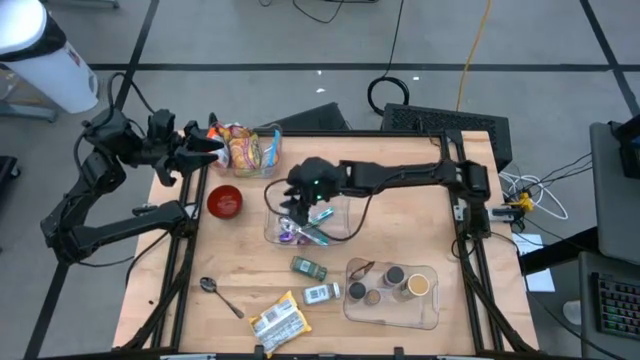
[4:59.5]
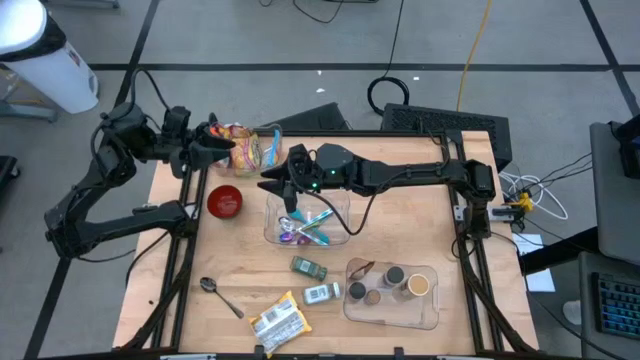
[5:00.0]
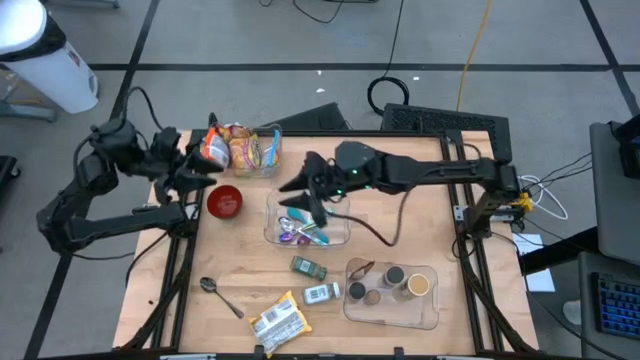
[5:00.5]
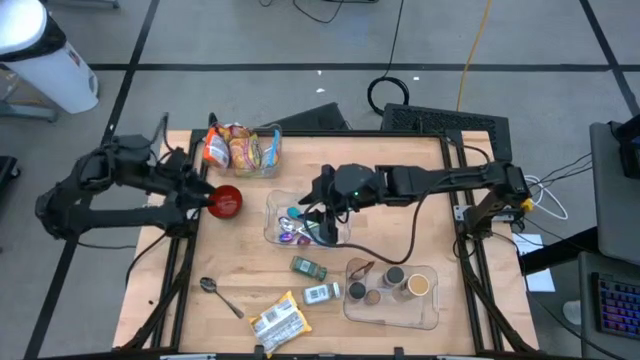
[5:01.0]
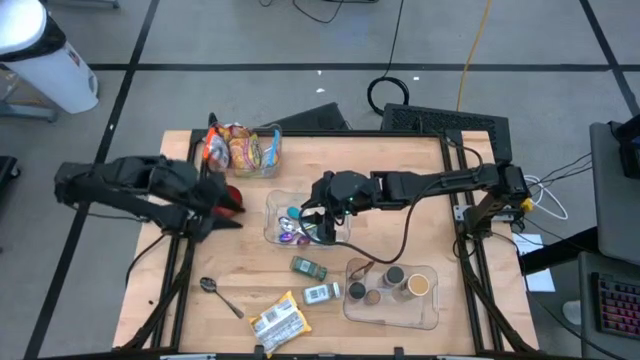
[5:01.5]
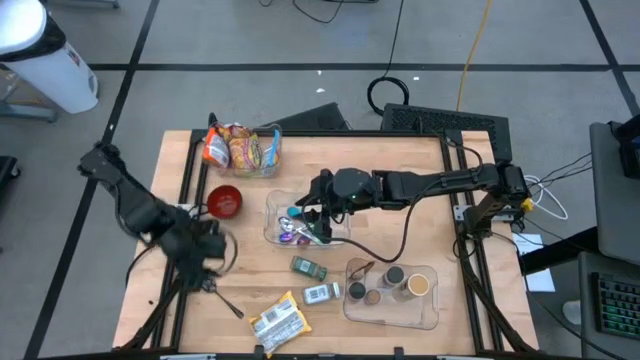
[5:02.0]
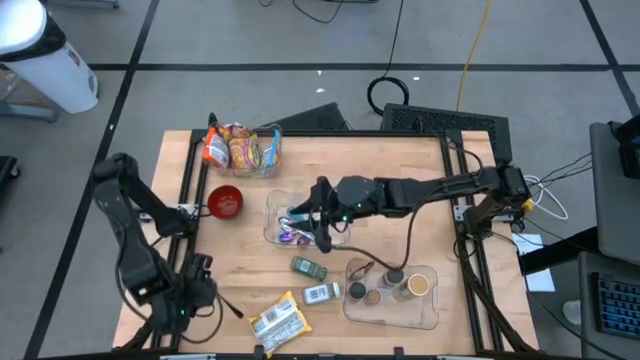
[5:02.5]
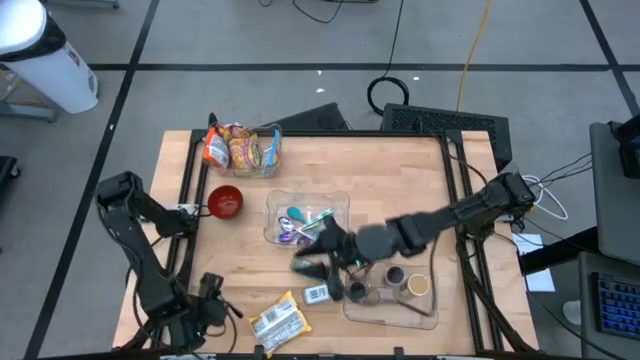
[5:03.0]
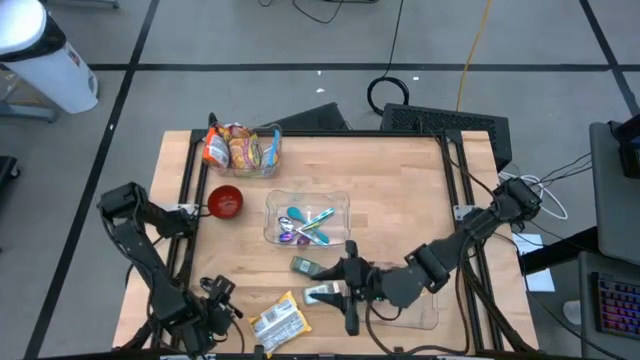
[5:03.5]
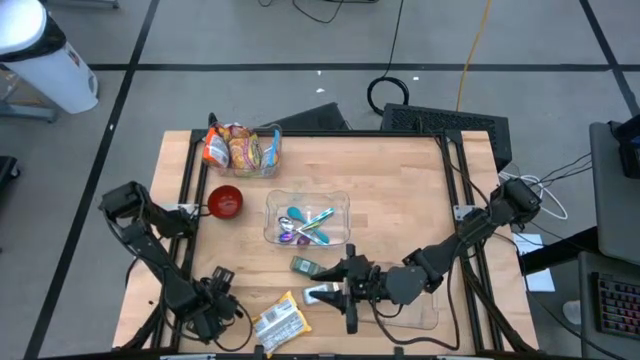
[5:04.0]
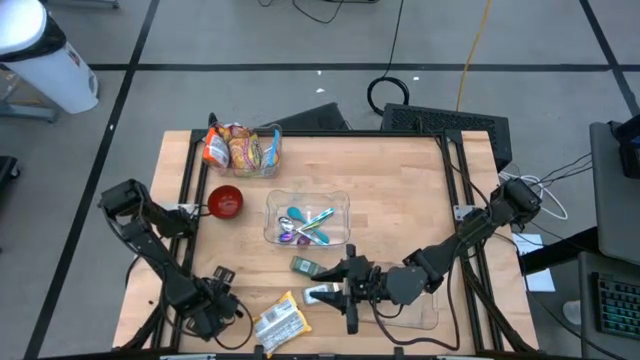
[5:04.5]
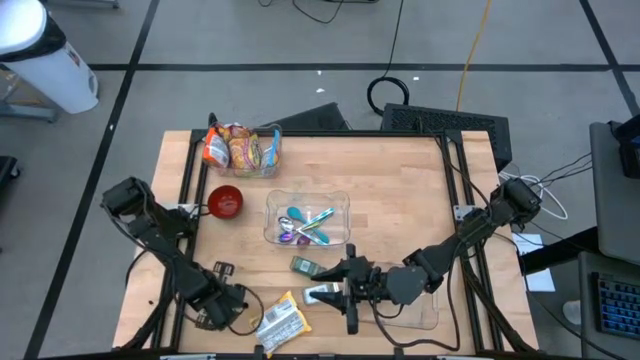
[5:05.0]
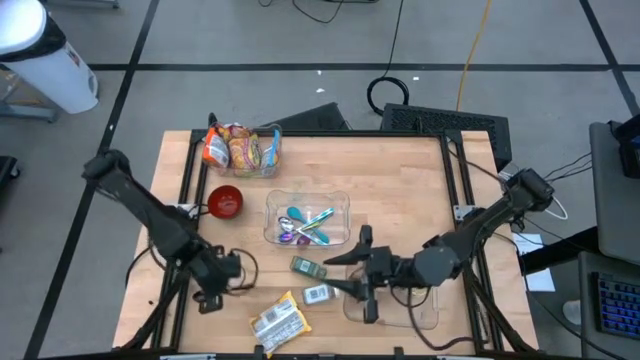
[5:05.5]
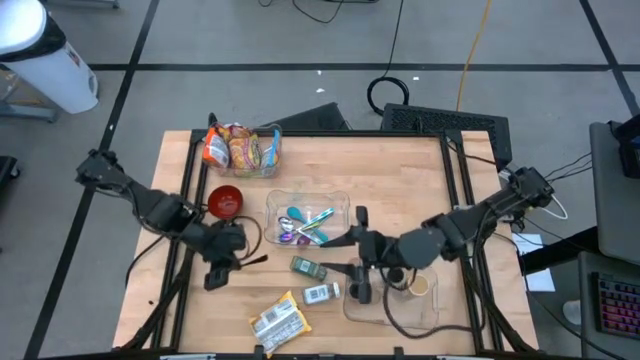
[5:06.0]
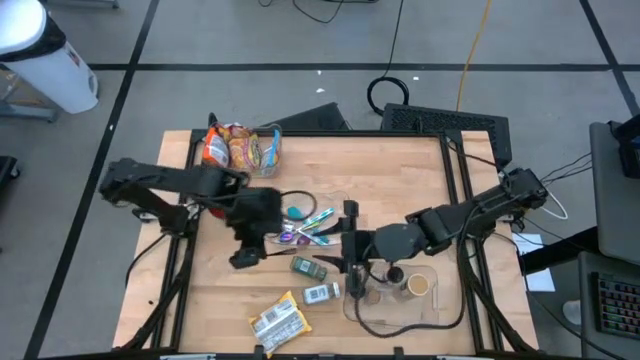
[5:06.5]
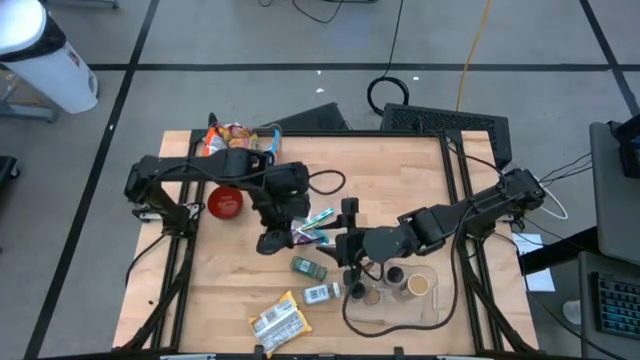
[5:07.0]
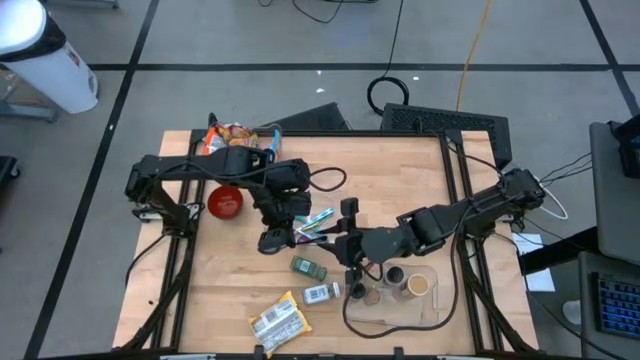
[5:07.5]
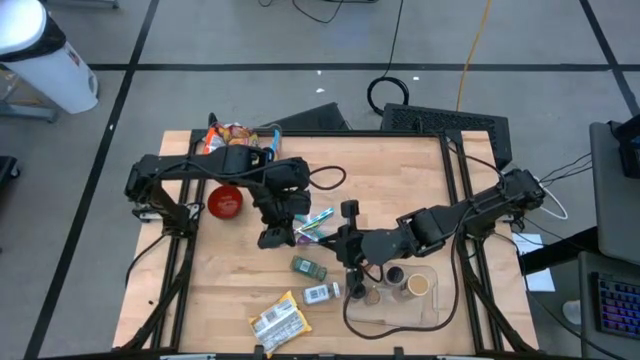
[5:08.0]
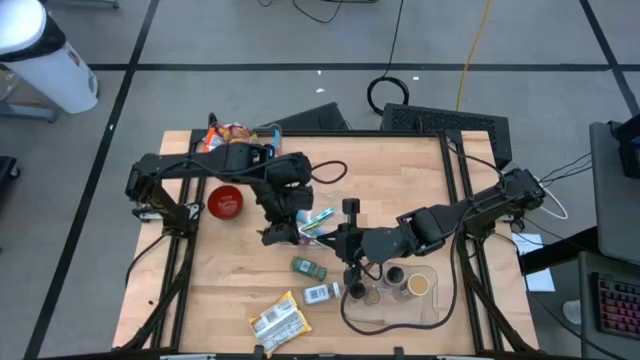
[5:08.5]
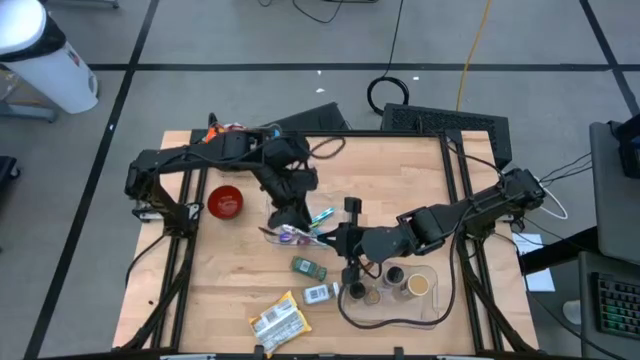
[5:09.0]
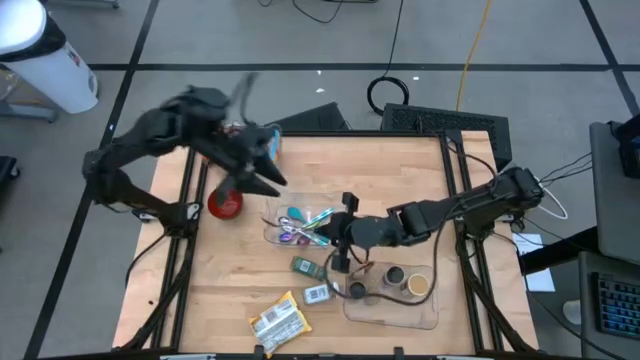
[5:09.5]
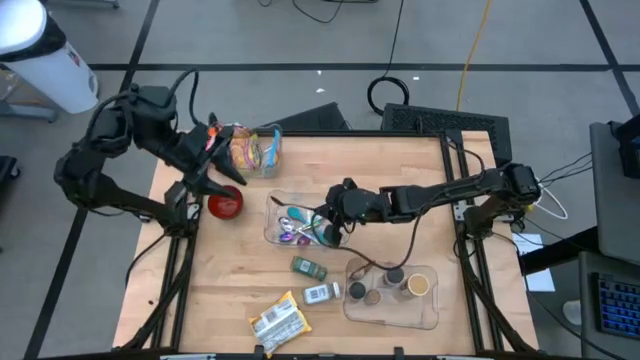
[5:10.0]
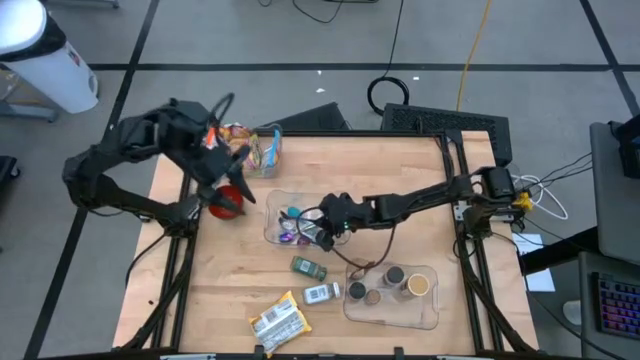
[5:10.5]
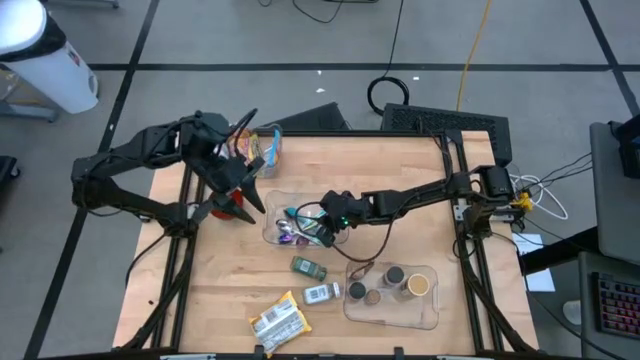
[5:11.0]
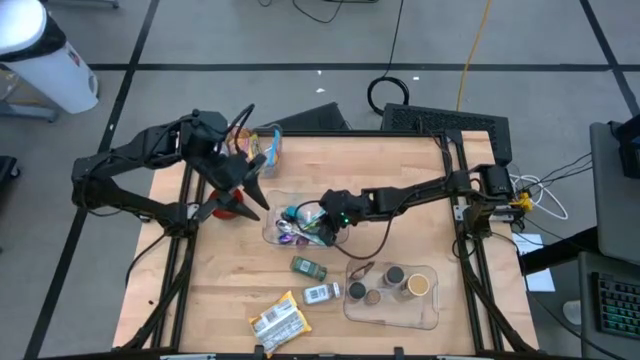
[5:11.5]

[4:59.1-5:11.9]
Task: Pick & Place Food Item
Put the black spoon into the middle transparent bin

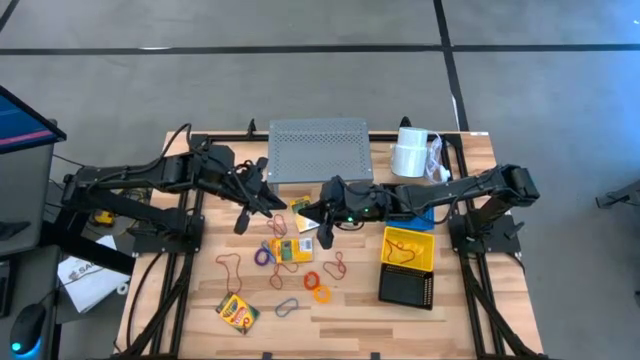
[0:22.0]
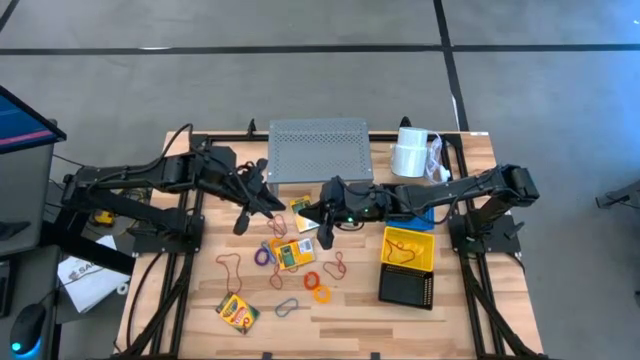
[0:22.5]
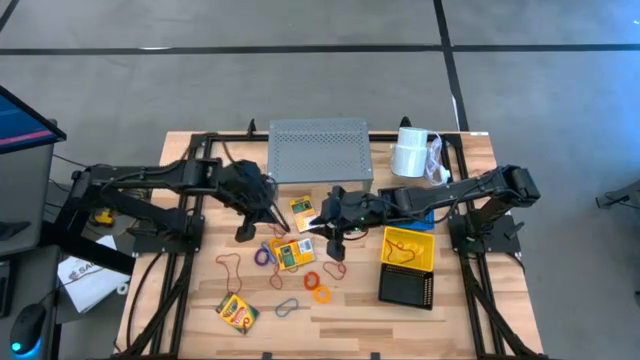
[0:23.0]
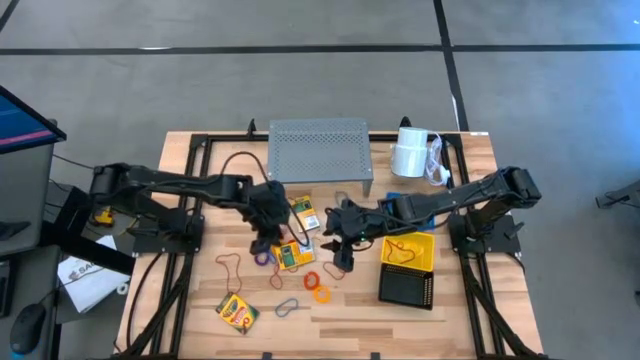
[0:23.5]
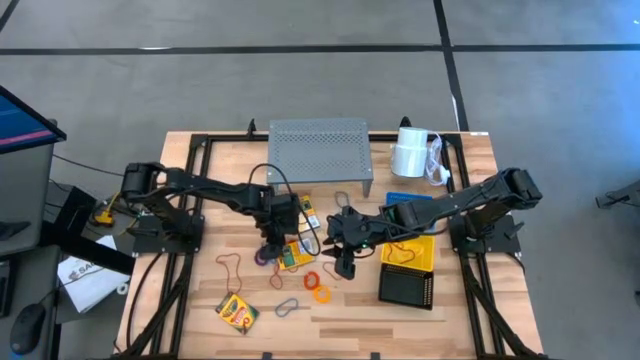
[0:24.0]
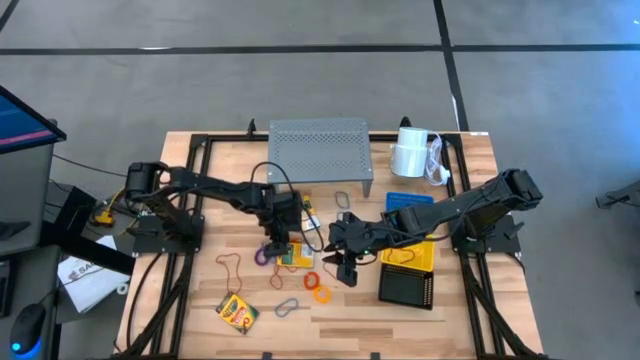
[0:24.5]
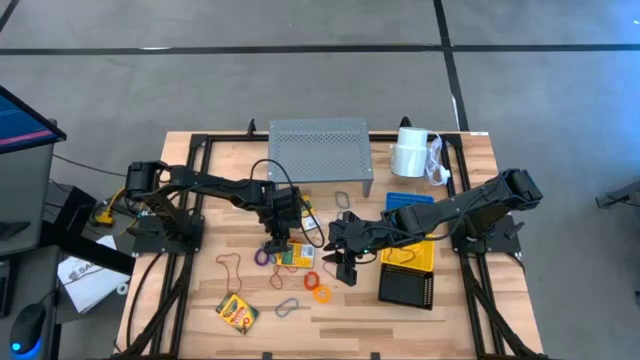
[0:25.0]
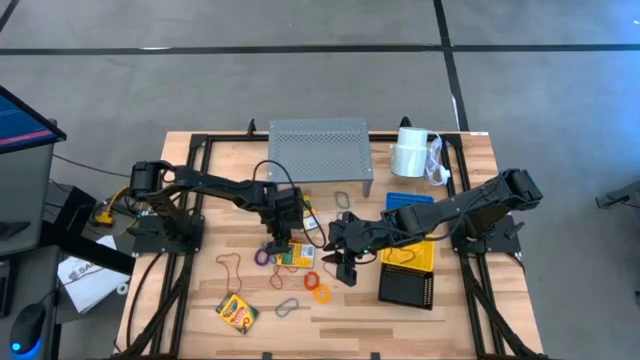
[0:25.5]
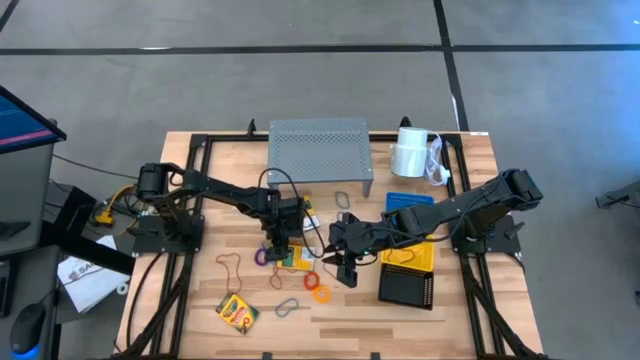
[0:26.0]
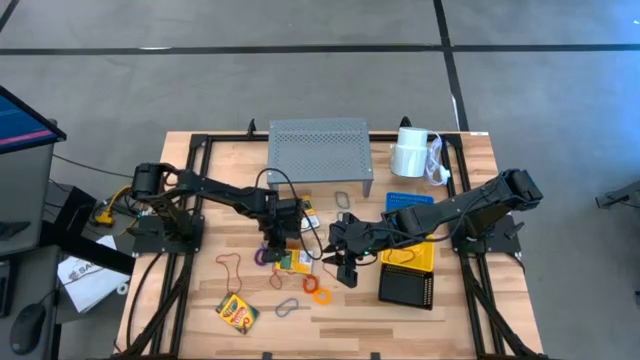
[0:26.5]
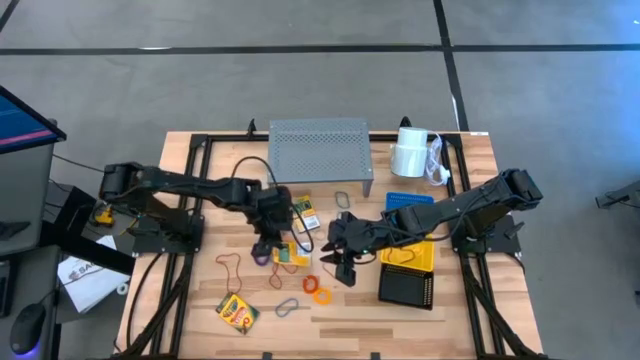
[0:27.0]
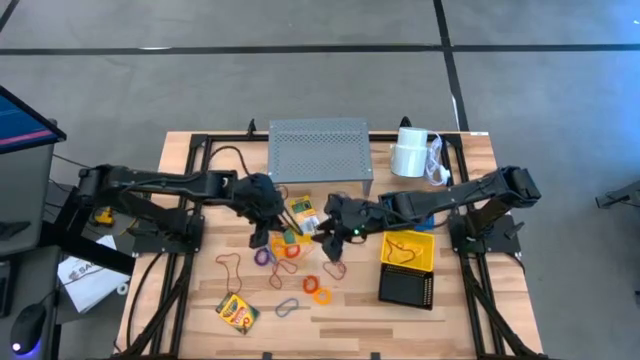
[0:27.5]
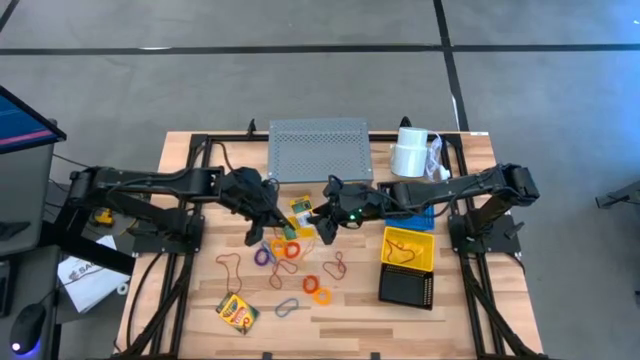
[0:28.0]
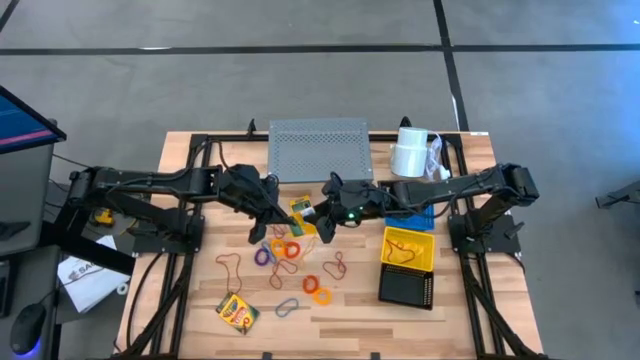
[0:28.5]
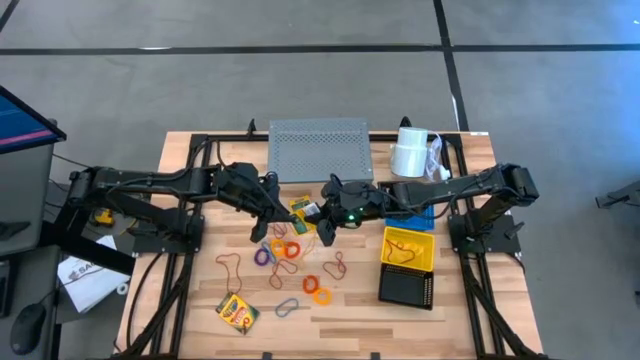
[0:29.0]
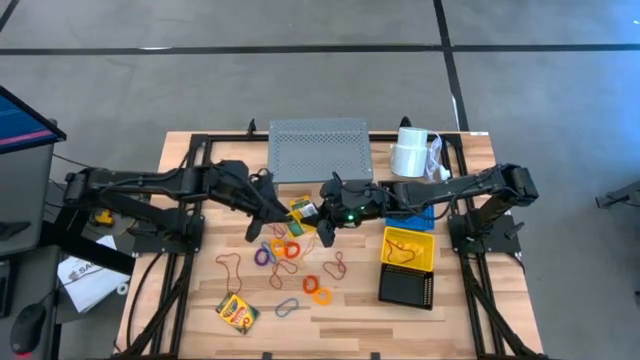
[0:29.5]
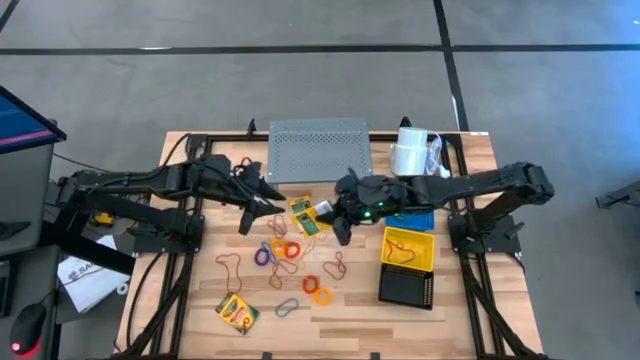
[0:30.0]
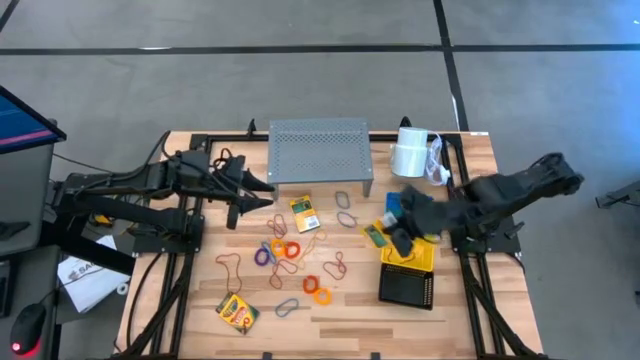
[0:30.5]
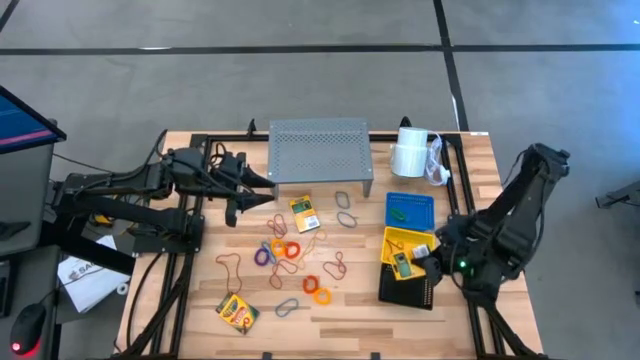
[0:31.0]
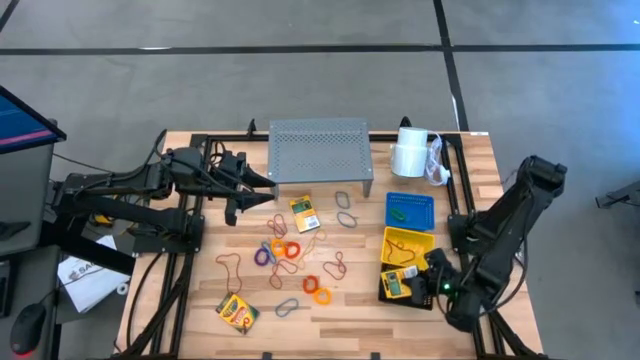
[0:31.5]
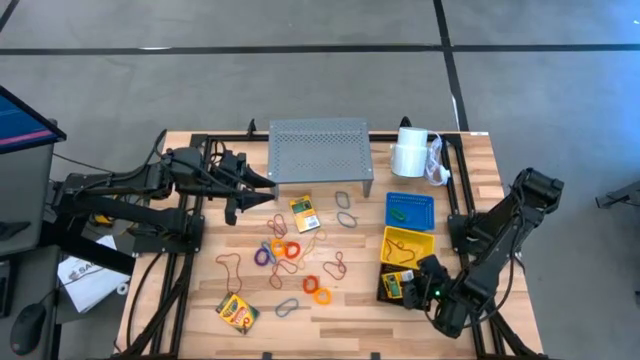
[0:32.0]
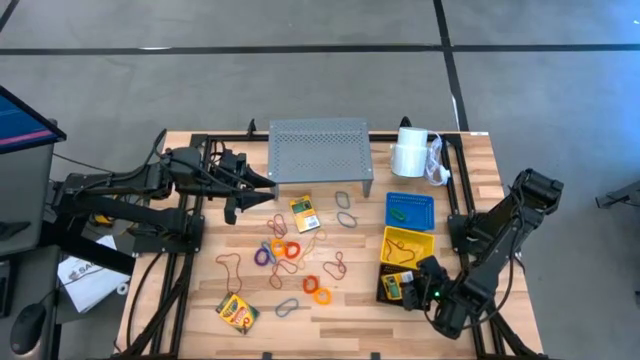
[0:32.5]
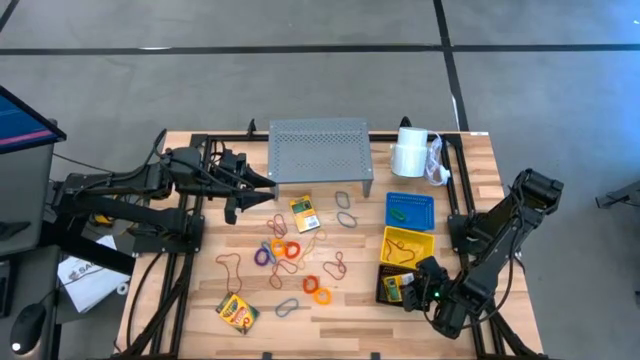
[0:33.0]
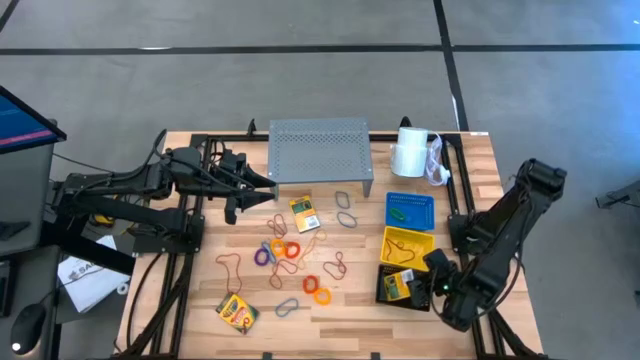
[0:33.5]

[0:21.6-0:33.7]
Task: Pick & Place Office Desk Supplies
Put the crayon box into the black basket
